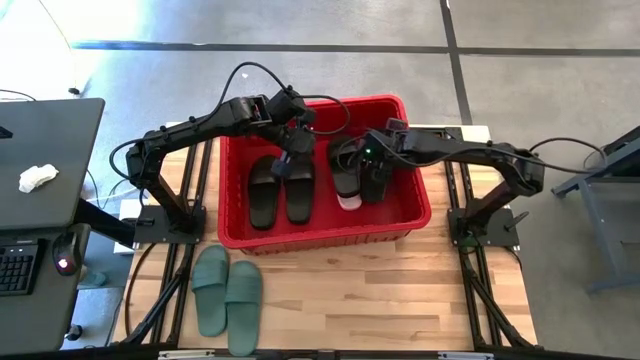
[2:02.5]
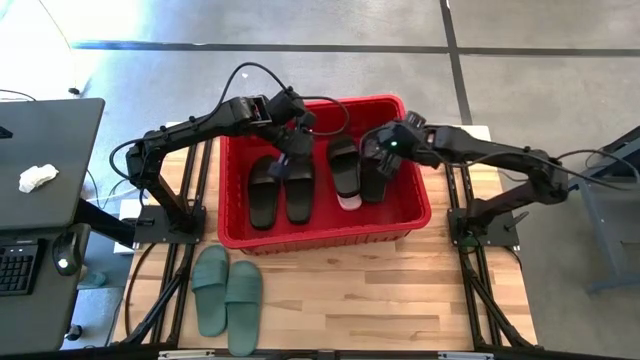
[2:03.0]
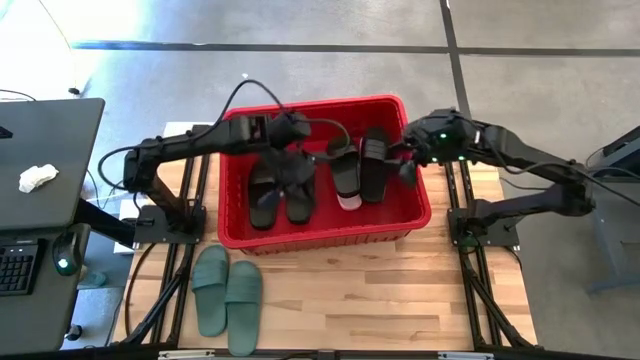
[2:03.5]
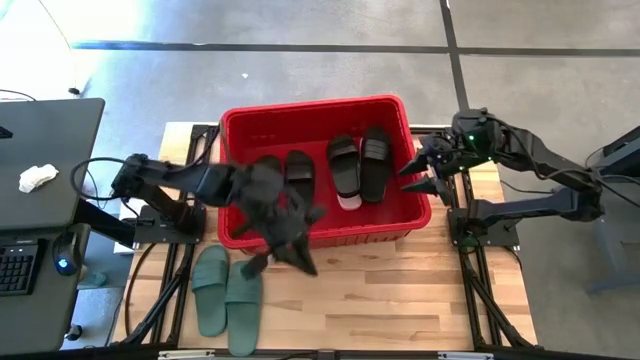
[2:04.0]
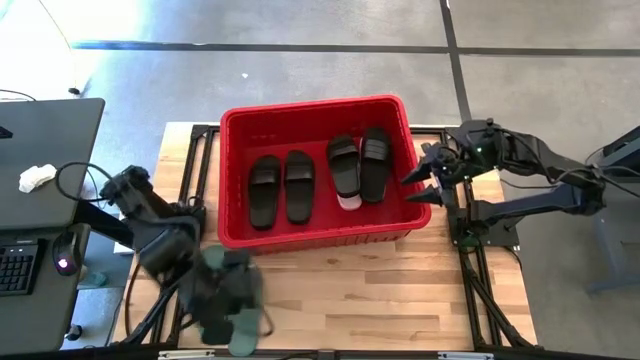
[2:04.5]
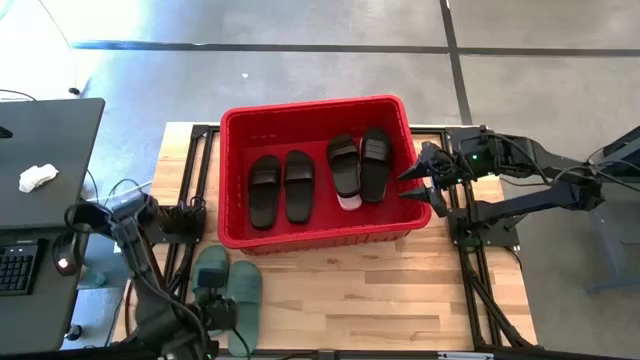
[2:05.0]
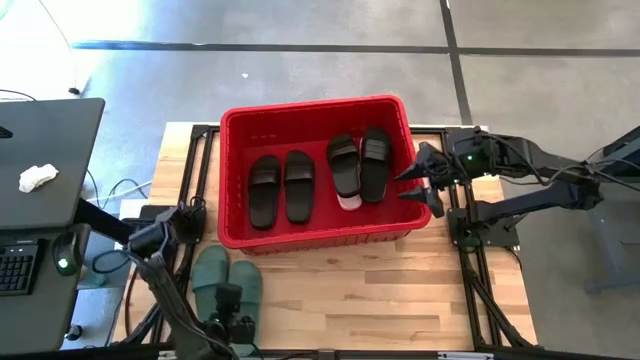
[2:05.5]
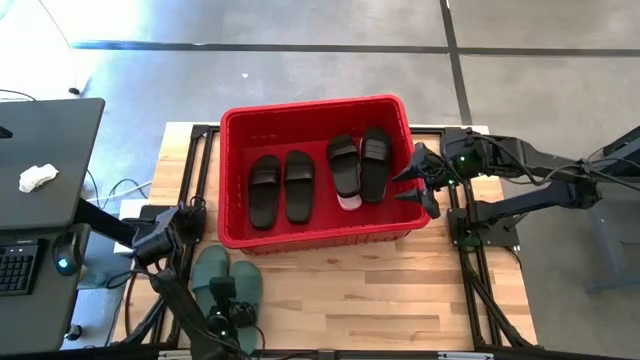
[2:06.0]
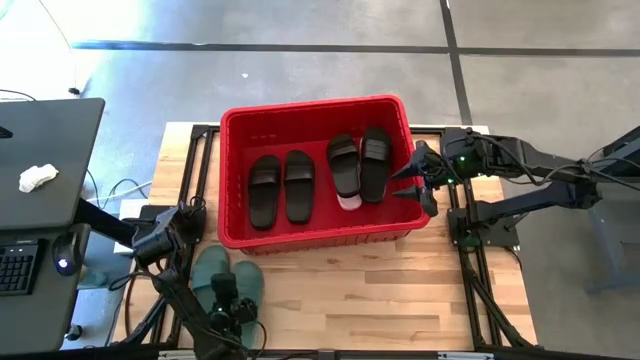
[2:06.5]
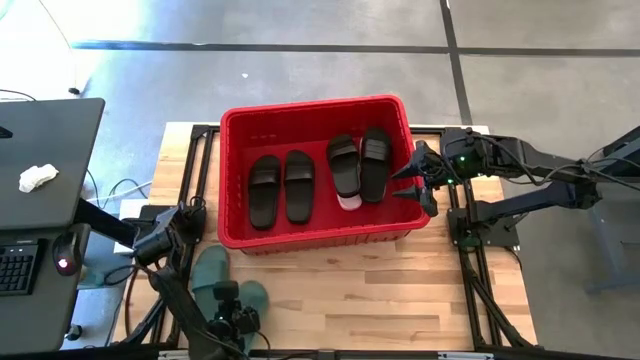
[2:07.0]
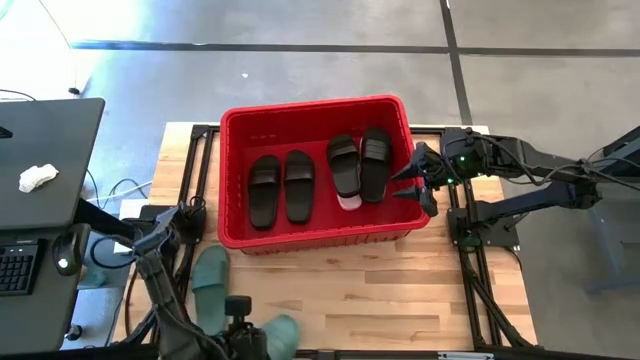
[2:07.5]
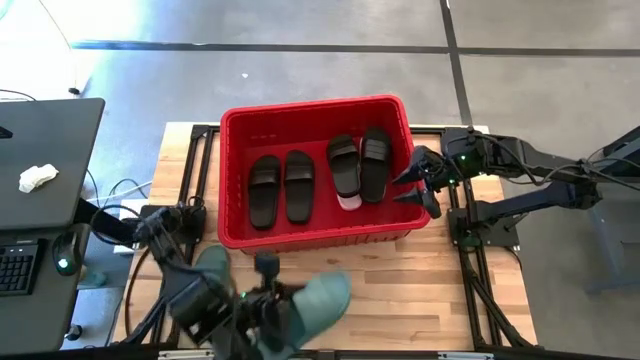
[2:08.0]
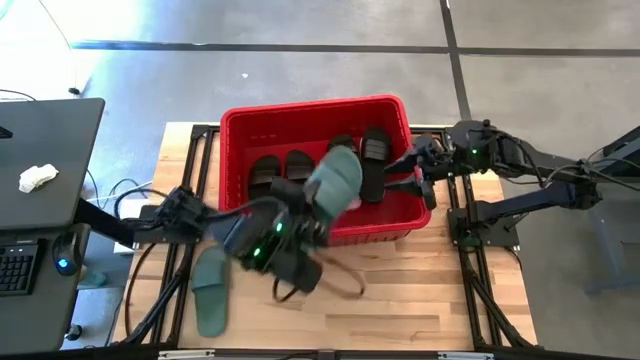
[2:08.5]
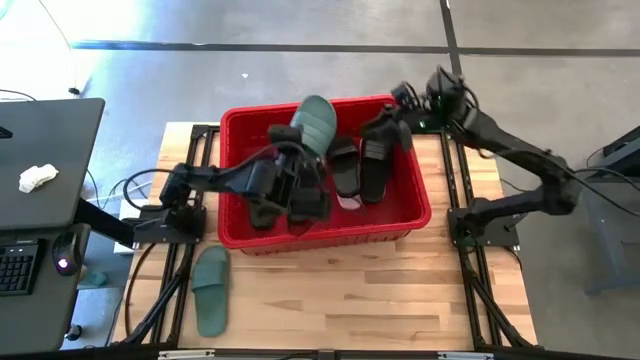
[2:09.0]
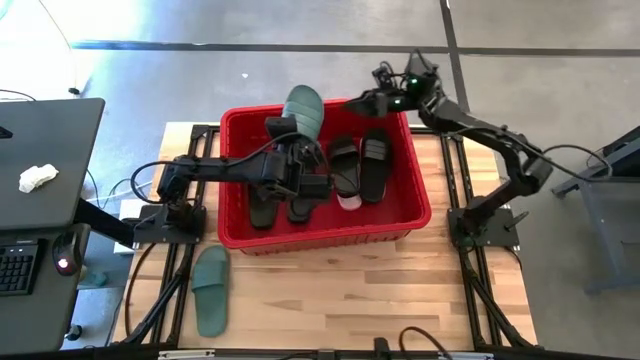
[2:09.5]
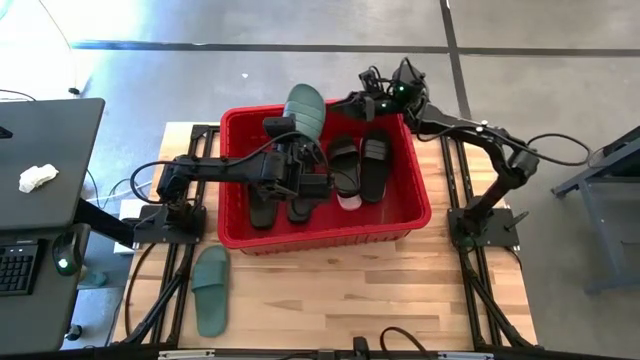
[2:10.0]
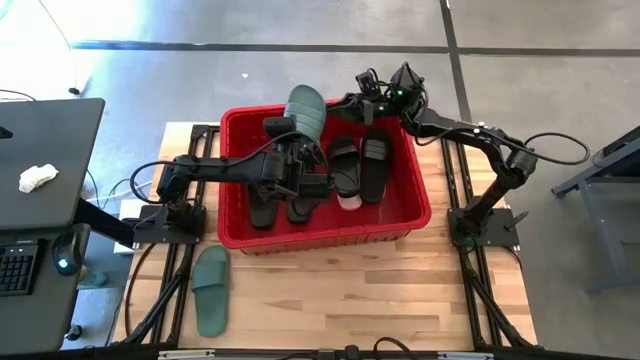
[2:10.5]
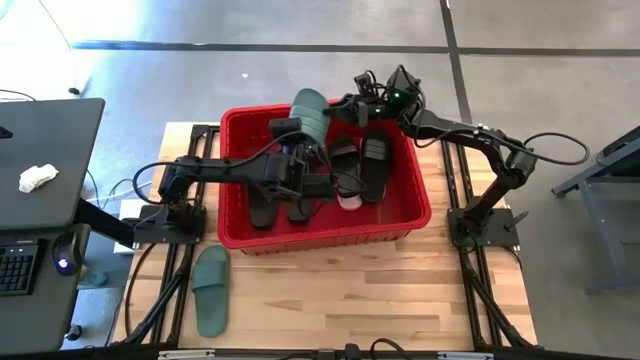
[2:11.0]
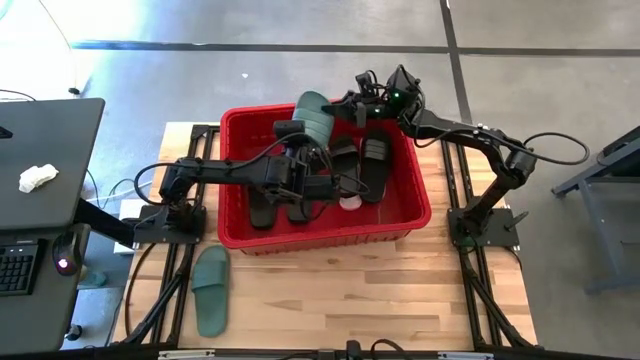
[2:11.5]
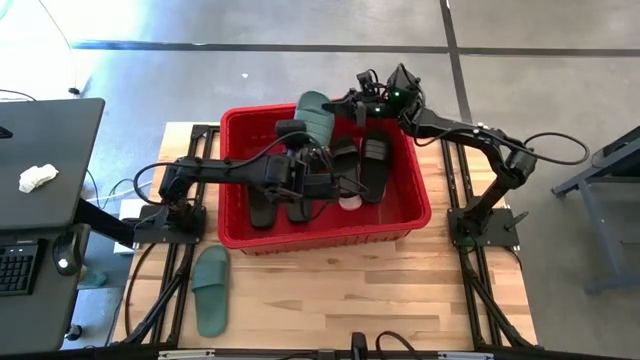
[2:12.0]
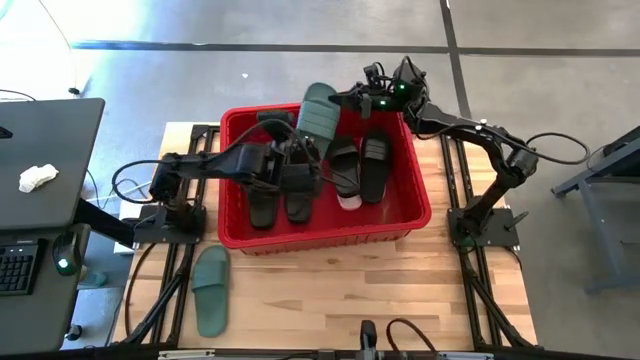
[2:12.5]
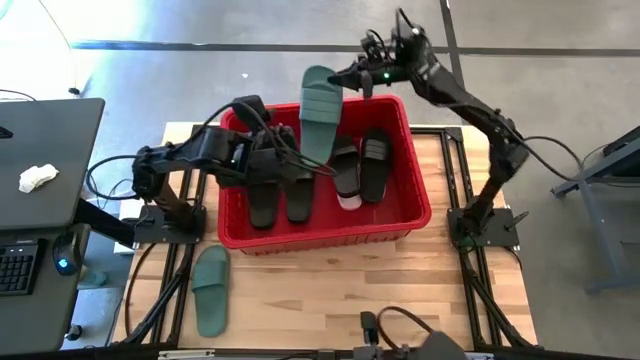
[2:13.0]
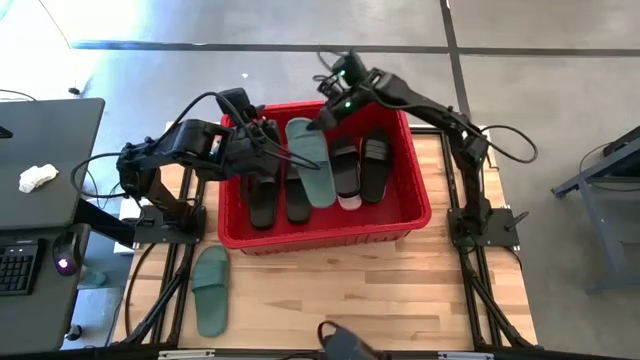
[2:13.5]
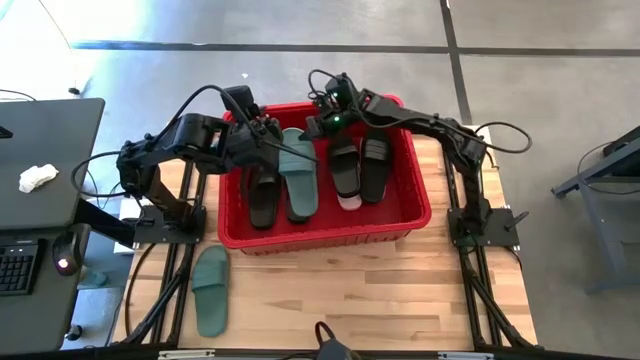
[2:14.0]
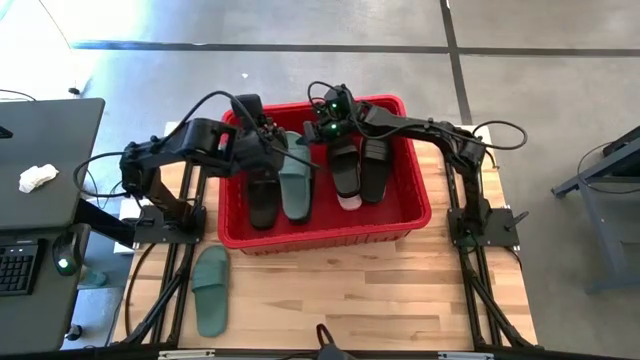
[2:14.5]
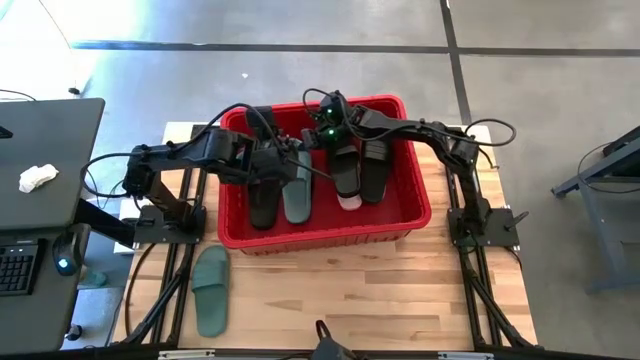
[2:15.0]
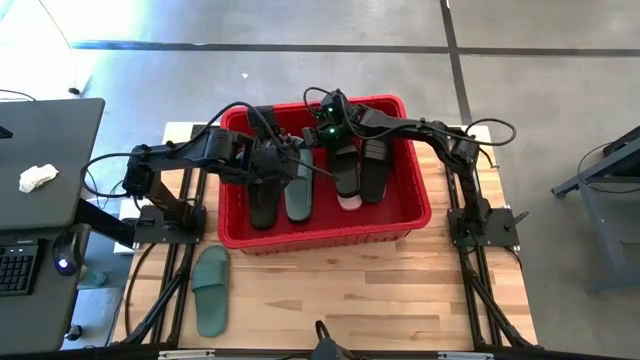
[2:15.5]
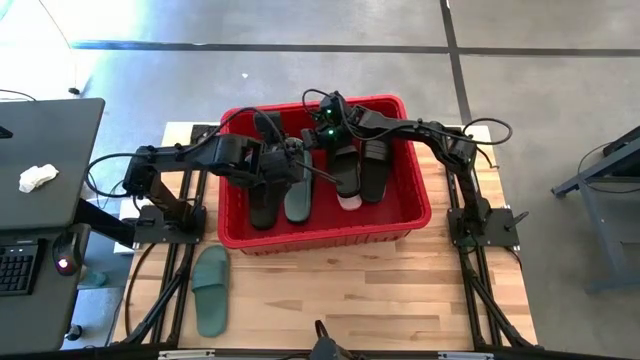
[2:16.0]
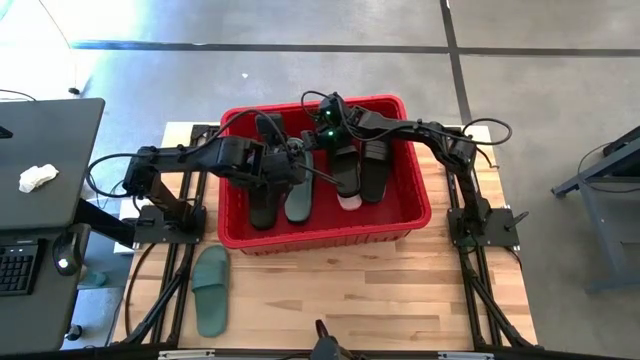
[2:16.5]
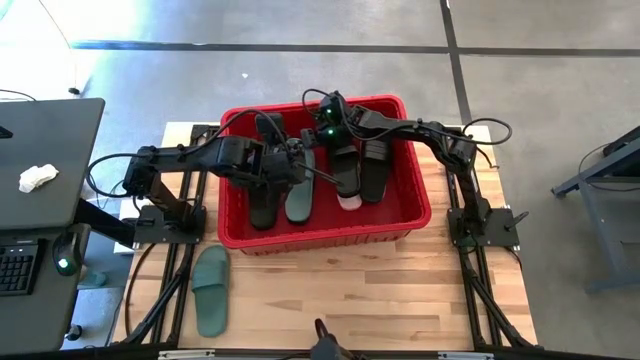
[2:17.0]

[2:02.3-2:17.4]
Task: Pick and place slides into bin
Stack the green slipper on top of the black slipper in the red bin

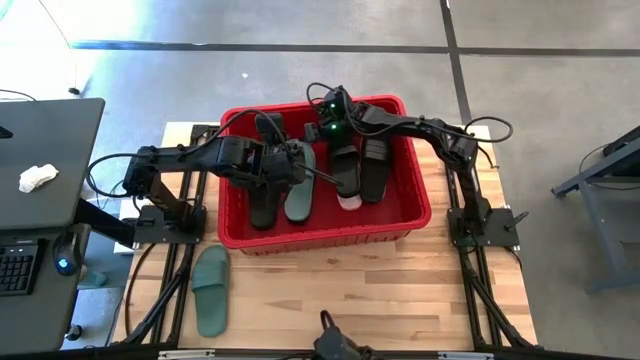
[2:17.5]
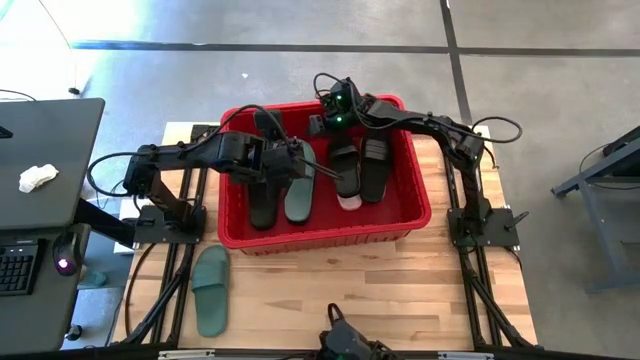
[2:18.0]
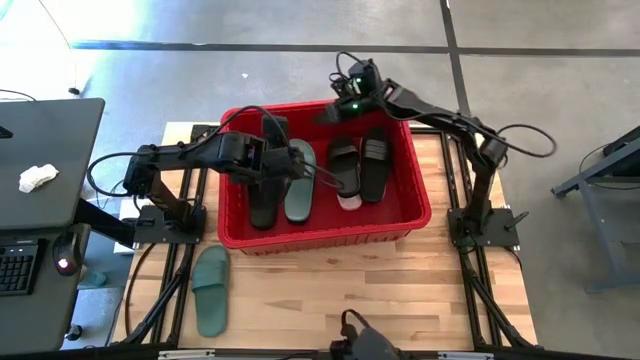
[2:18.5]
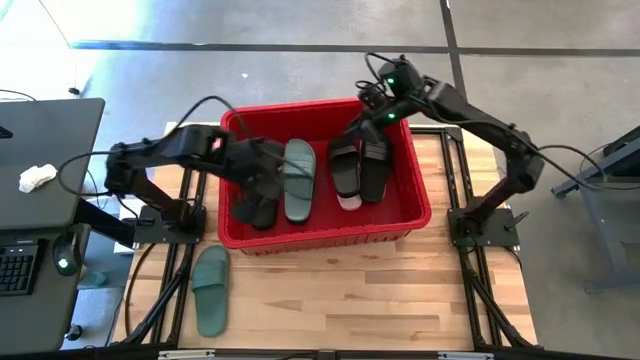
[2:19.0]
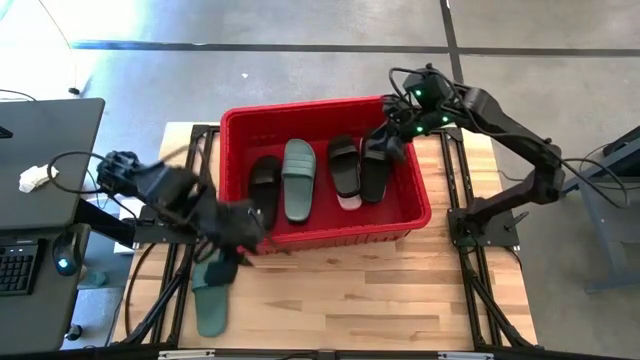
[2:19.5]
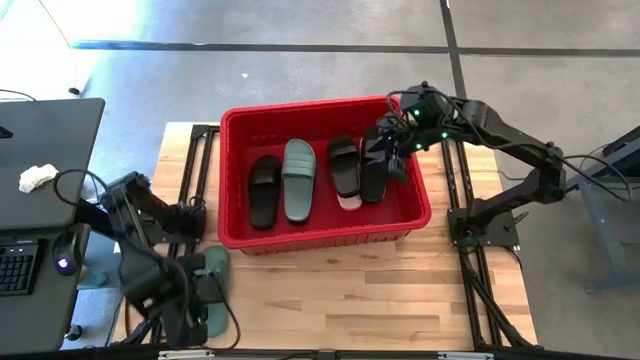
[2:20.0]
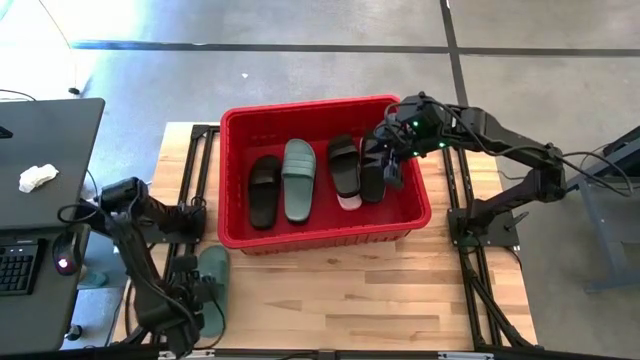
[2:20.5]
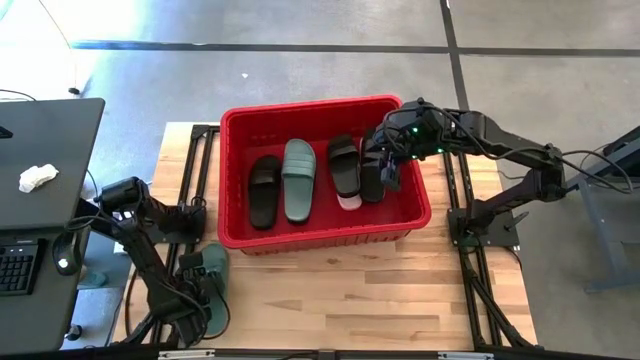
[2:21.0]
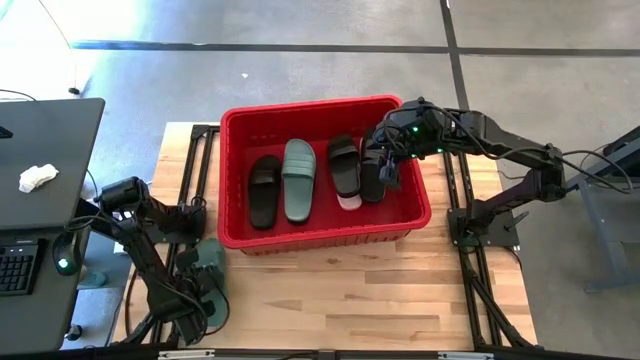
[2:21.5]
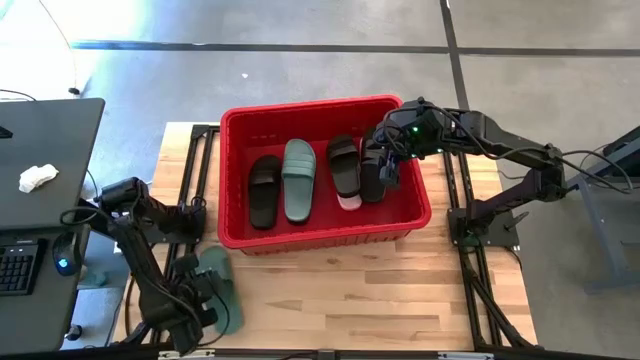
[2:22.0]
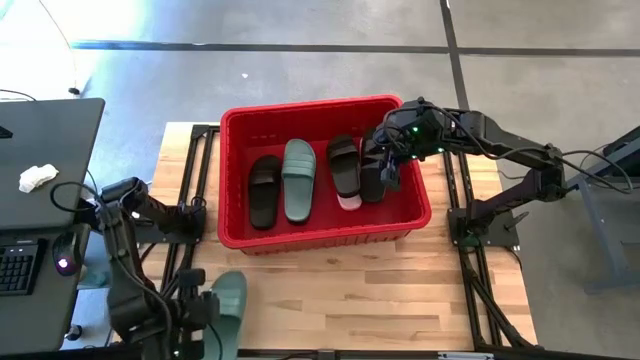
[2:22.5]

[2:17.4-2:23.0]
Stack the green slipper on top of the black slipper in the red bin

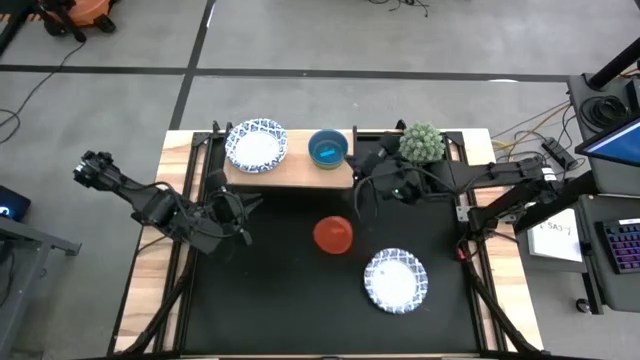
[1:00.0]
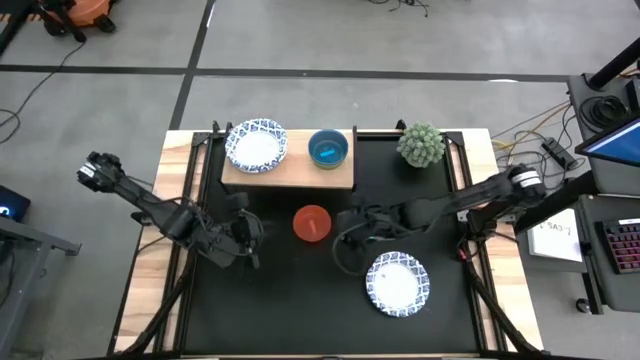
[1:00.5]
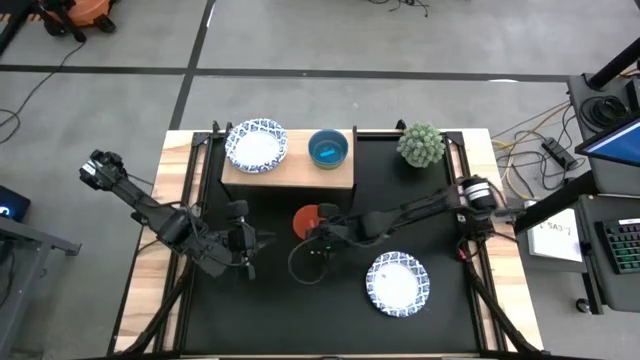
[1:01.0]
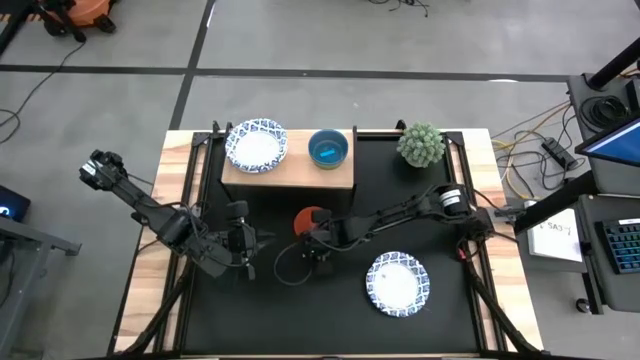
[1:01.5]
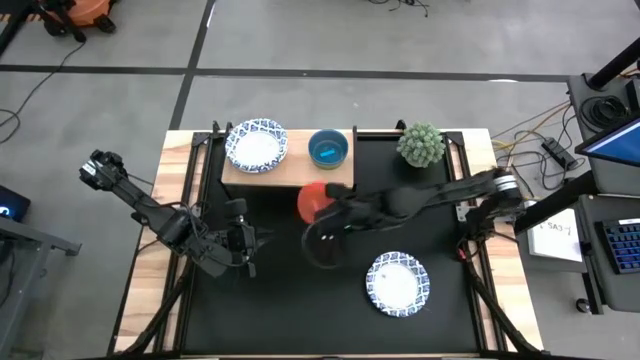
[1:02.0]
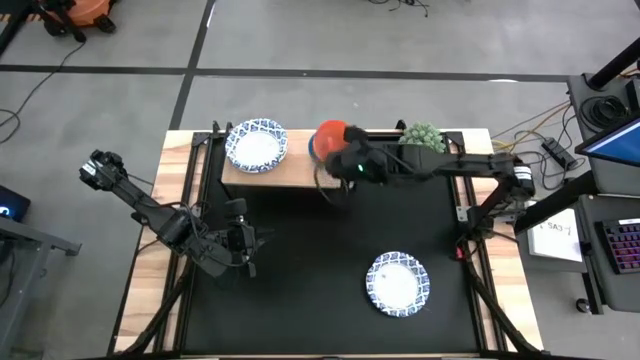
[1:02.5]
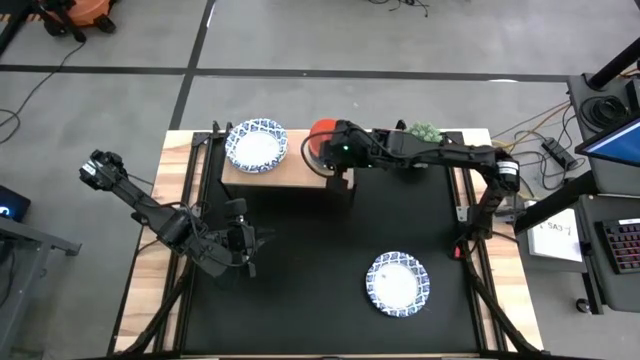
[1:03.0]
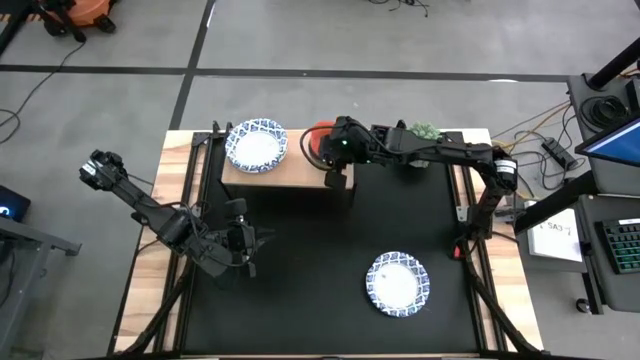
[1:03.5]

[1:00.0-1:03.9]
Task: Place and stack bowls onto a shelf
Stack the orange bowl on top of the blue bowl on the shelf
